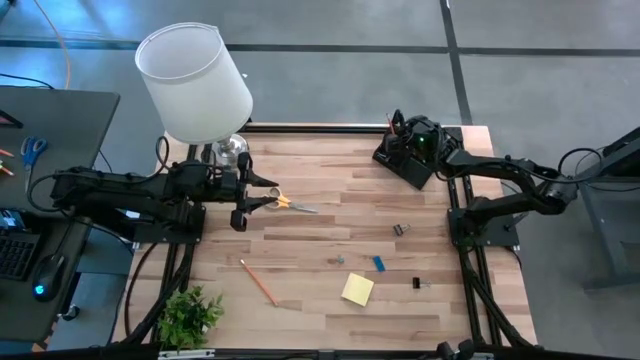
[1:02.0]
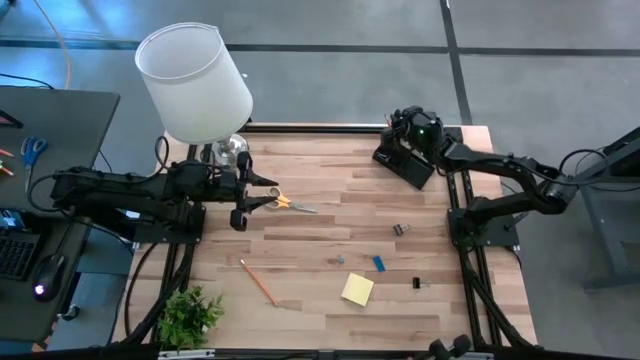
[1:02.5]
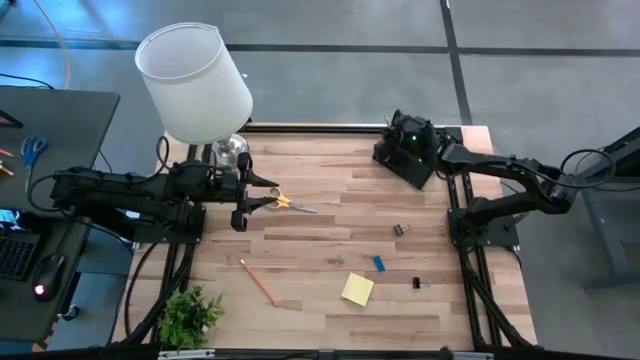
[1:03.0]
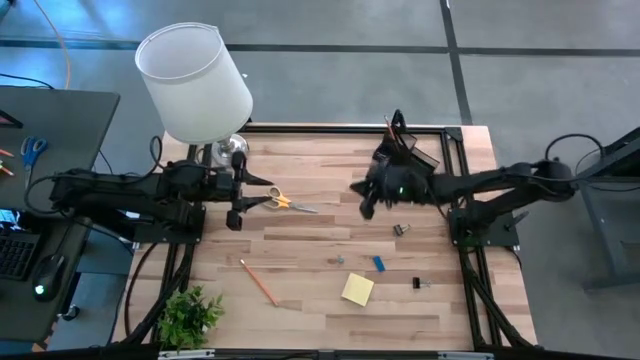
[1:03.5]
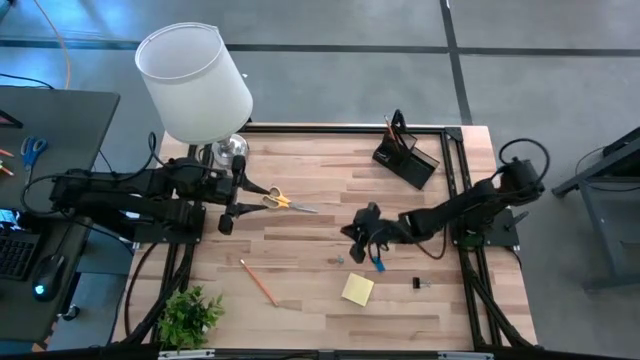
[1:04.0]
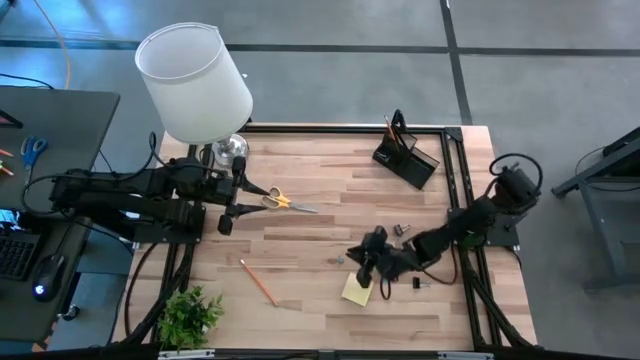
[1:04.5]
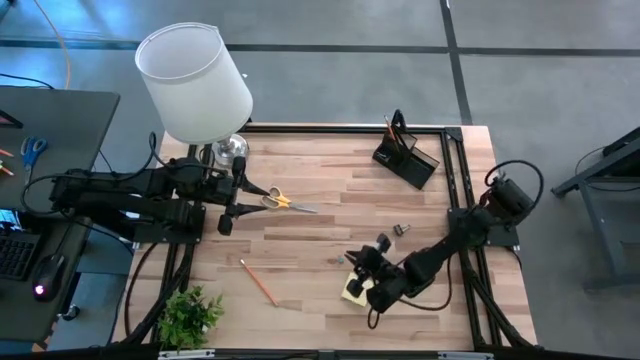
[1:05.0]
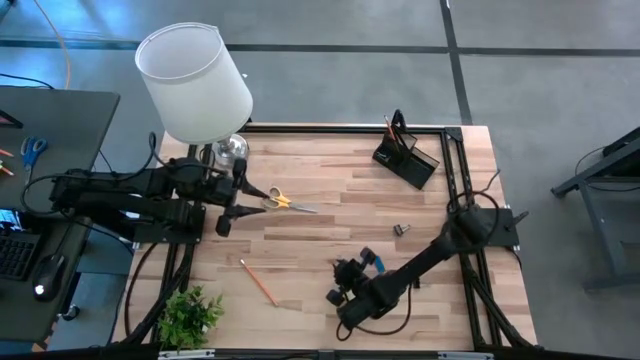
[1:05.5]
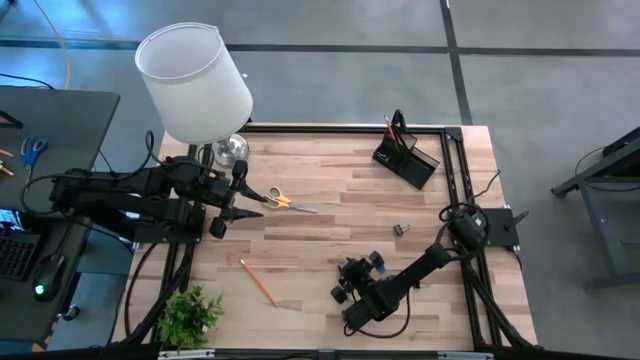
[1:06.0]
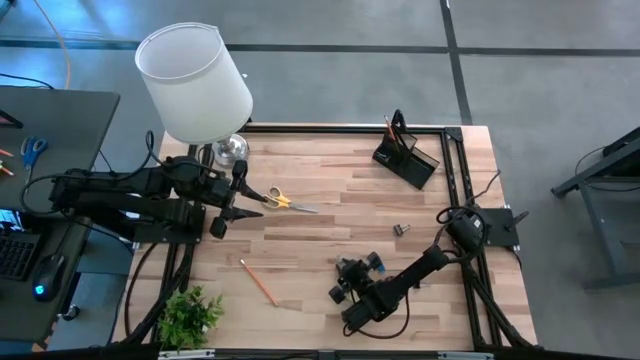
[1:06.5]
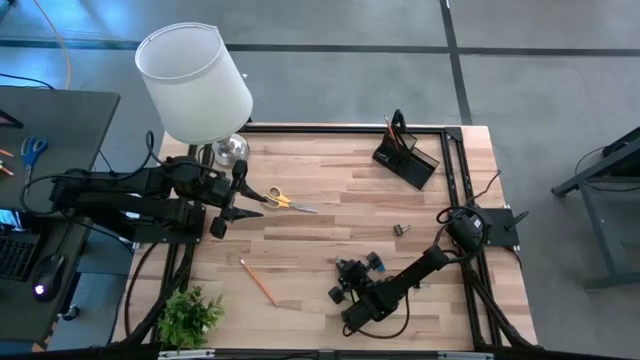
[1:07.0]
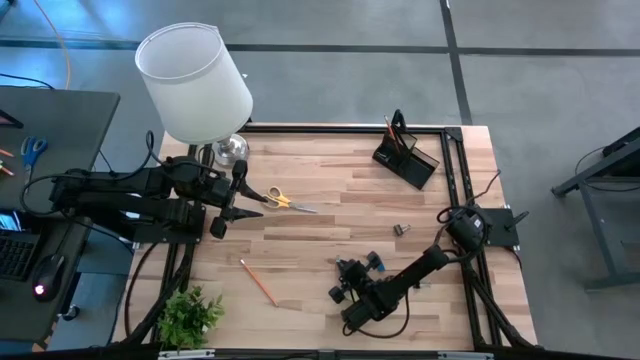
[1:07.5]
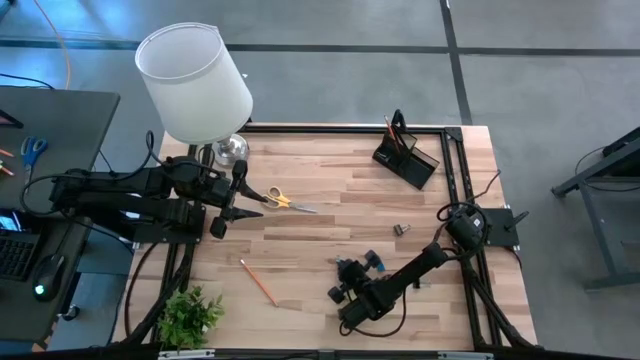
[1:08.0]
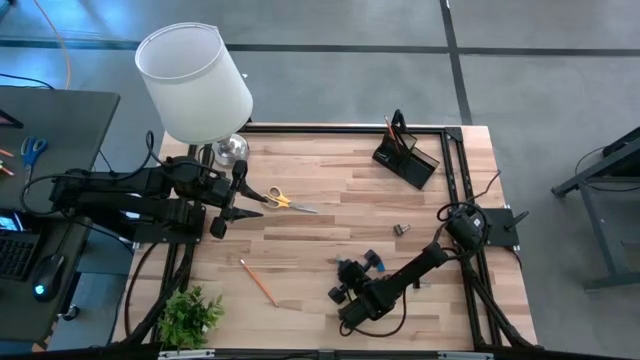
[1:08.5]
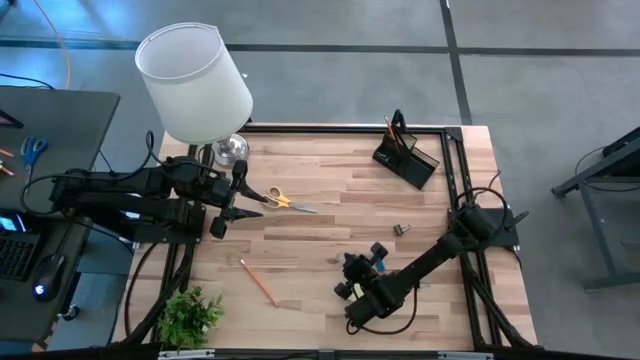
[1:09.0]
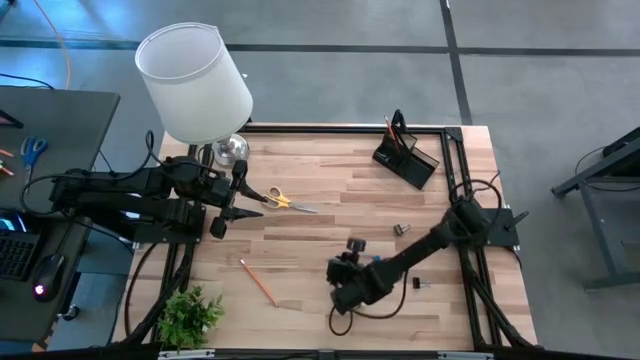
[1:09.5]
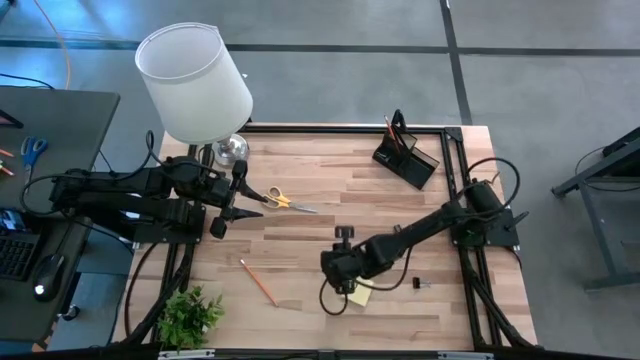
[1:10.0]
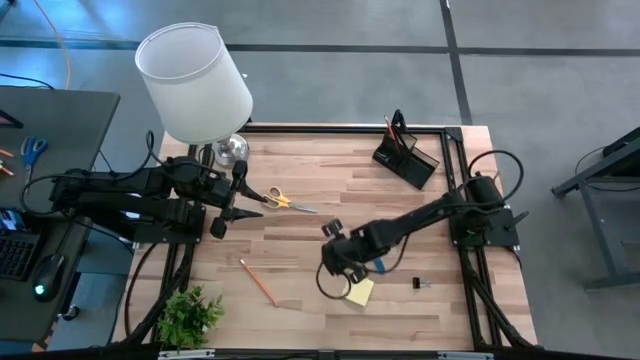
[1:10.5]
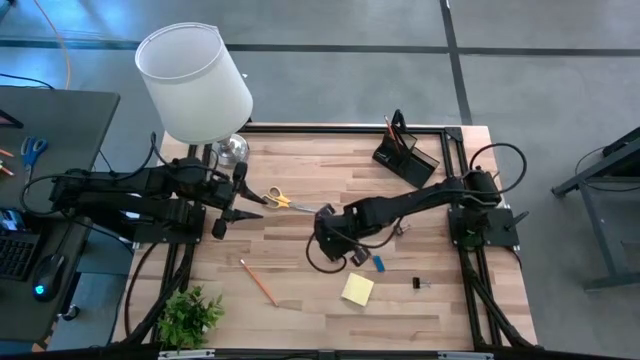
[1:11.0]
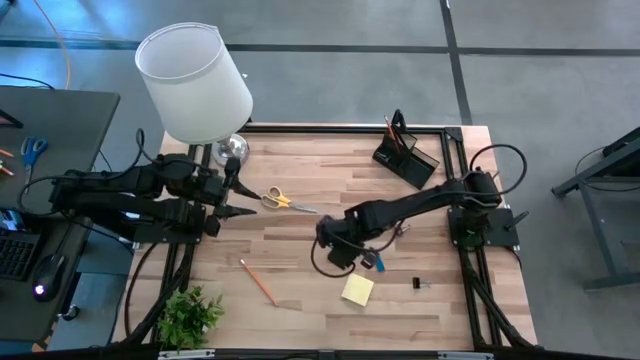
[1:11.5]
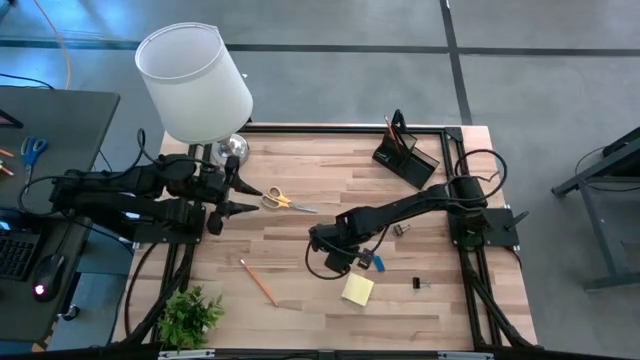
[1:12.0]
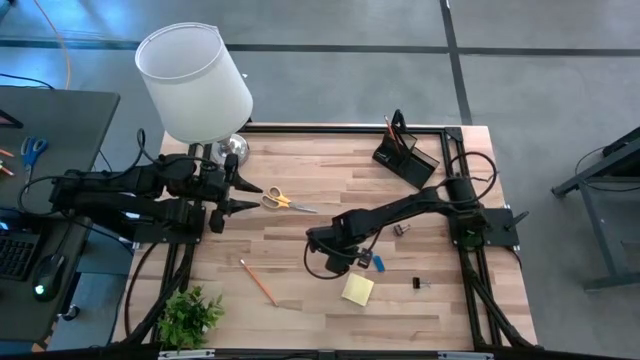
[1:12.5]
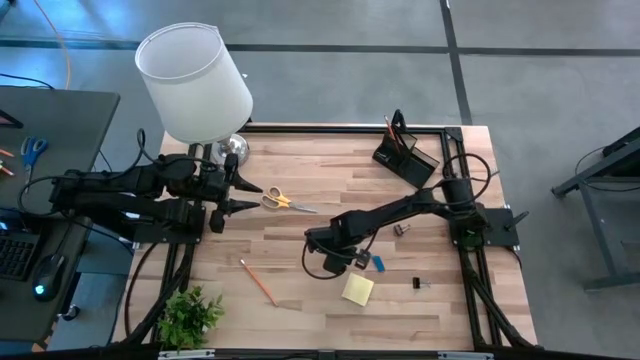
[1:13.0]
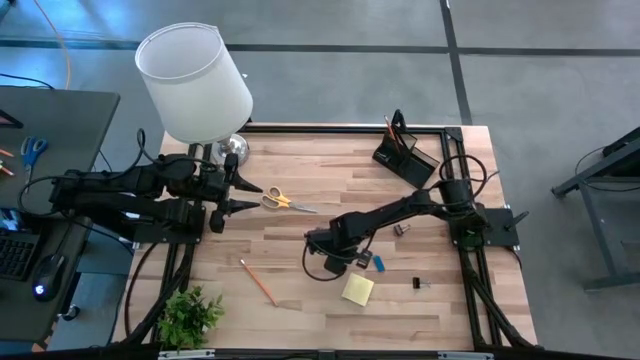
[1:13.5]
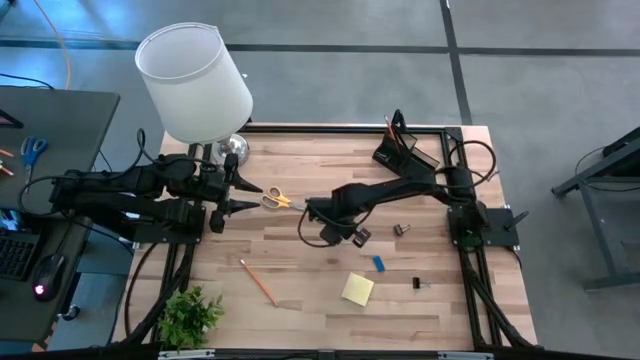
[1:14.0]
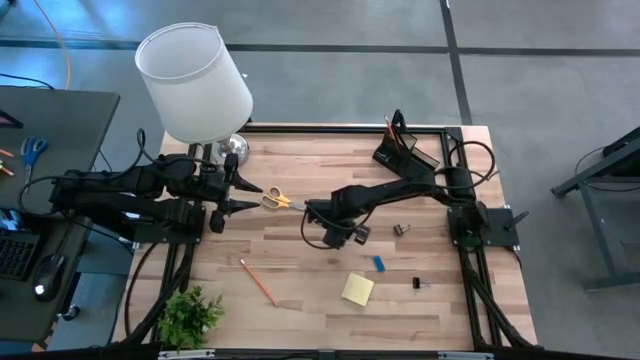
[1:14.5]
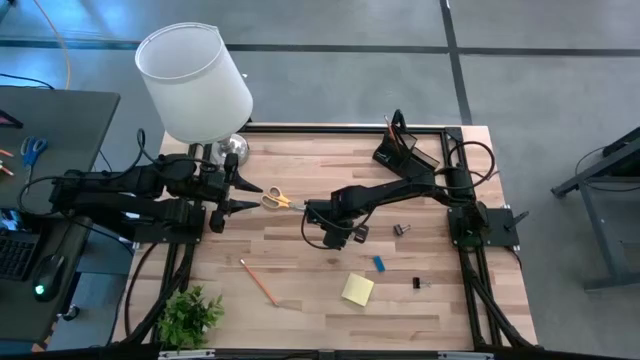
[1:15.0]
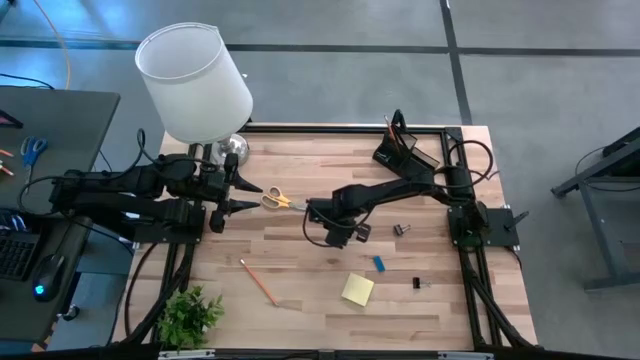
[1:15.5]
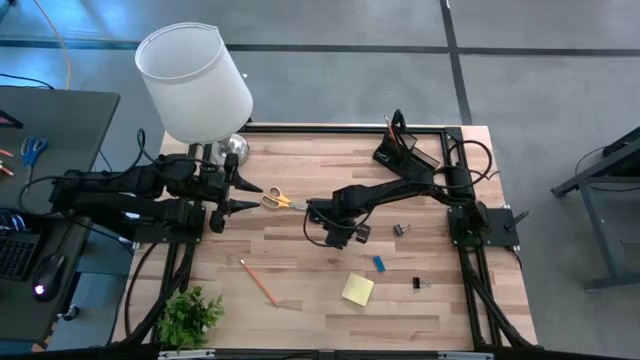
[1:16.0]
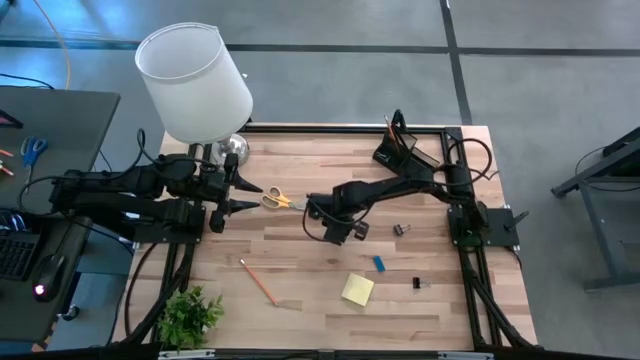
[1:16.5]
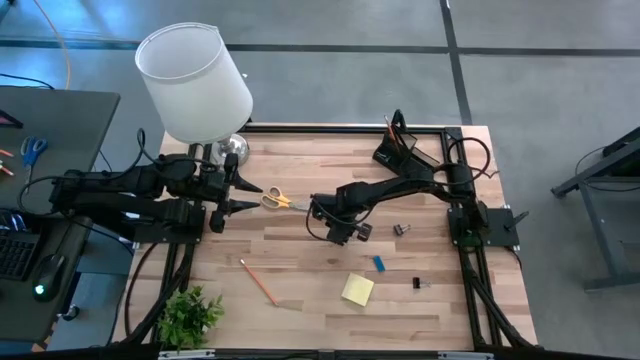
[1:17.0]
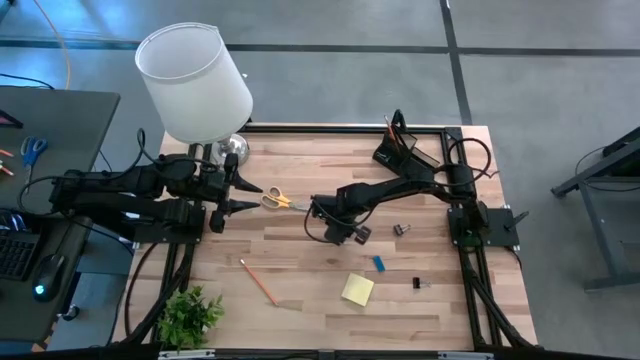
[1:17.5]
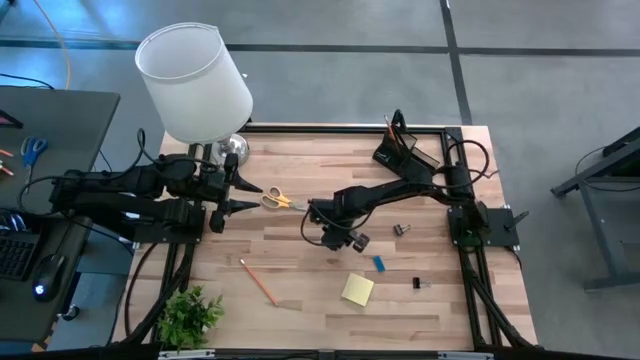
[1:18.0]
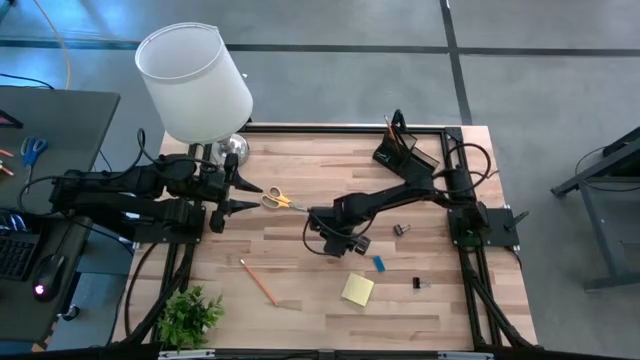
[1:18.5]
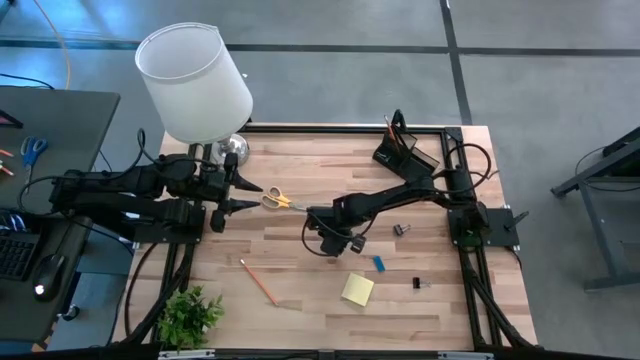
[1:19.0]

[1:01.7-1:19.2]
Task: Pick and place office supplies into organizer
Put the green binder clip into the mesh desk organizer

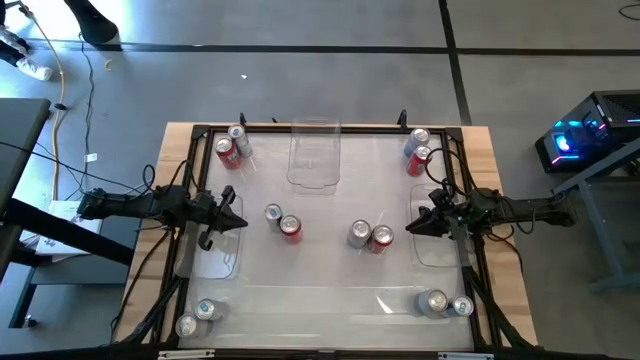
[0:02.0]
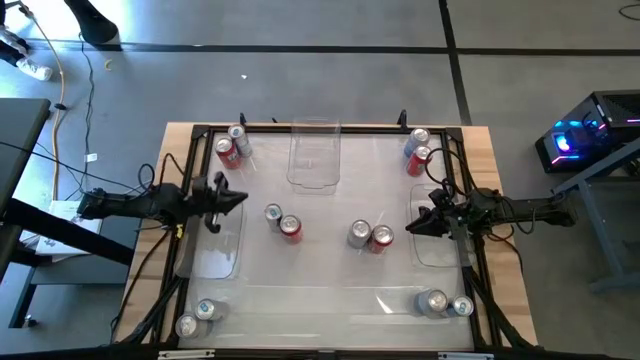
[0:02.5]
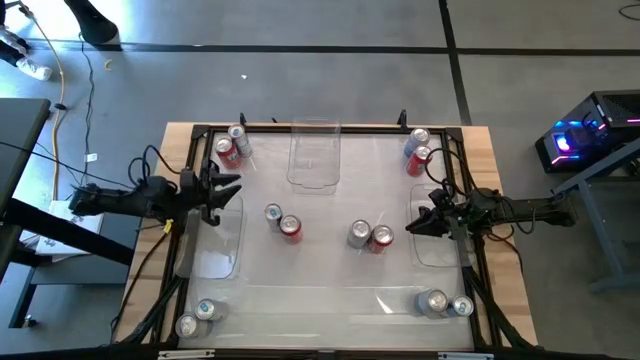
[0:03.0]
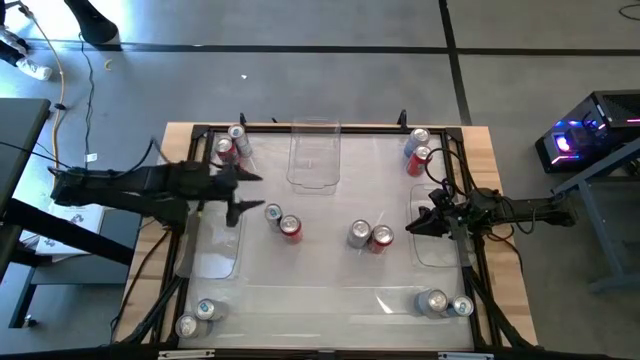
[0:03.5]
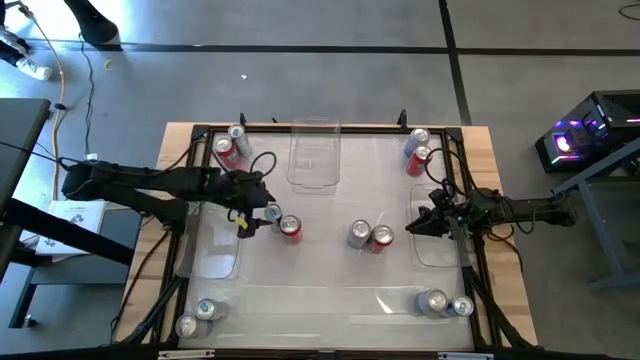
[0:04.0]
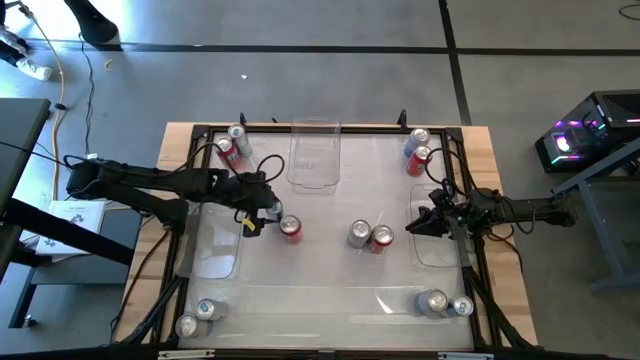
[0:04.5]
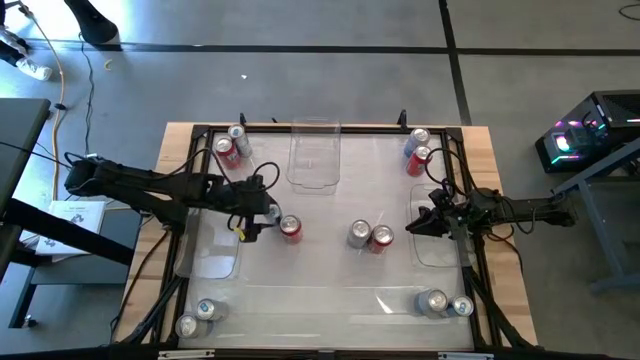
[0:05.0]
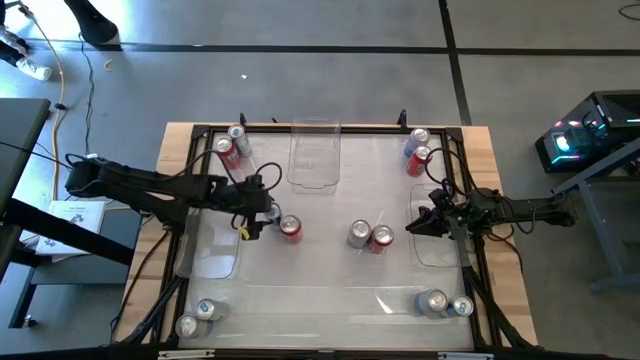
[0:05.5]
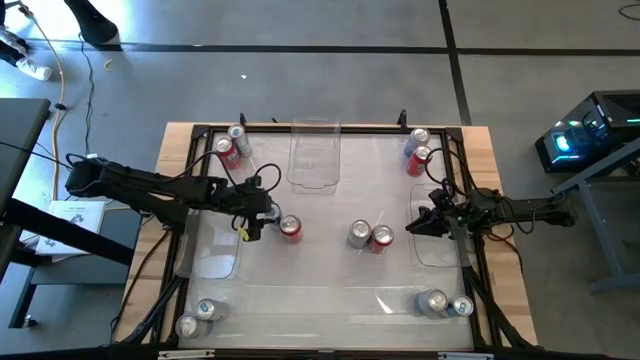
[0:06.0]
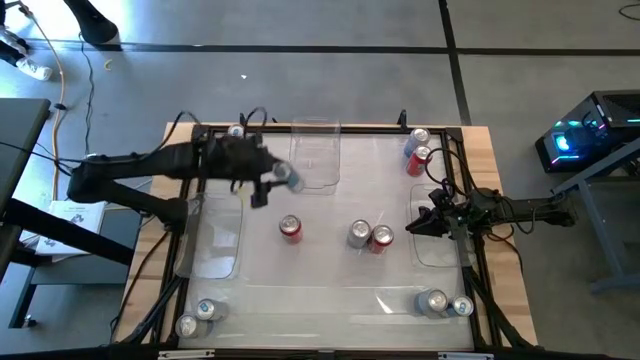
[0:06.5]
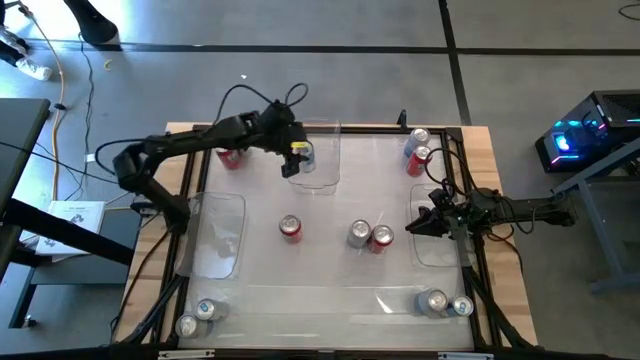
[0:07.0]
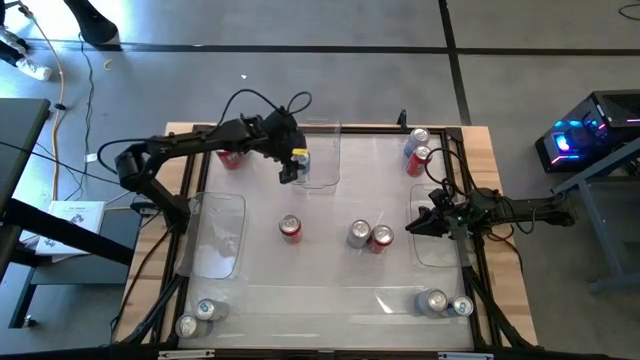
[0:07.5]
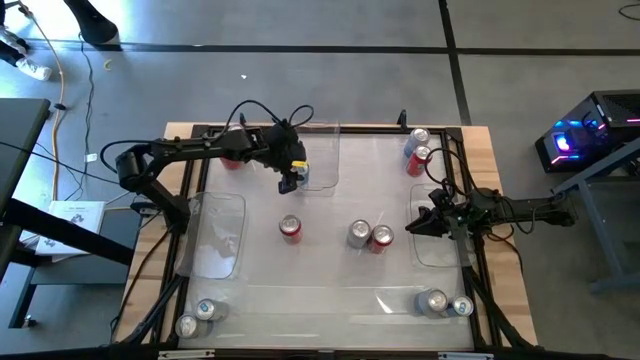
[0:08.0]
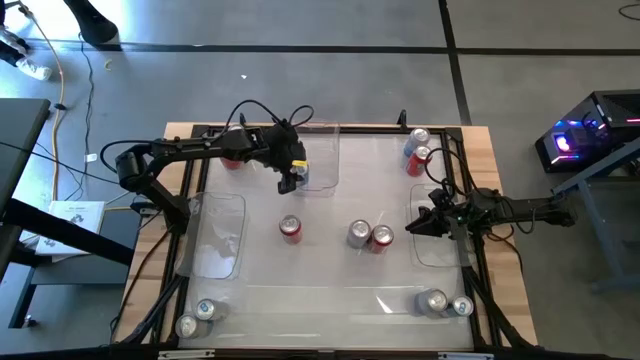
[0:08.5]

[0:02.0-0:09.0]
Task: Sort soda cans
Put the center blue soda can into the top center transparent bin
